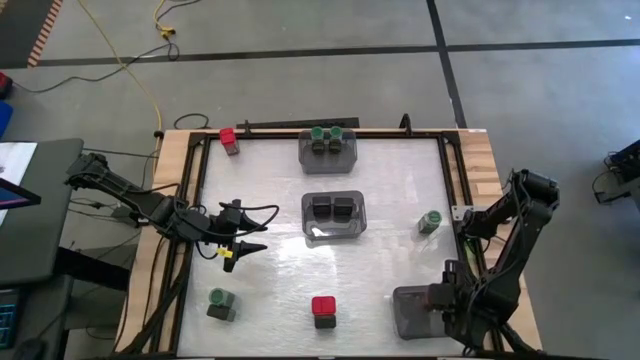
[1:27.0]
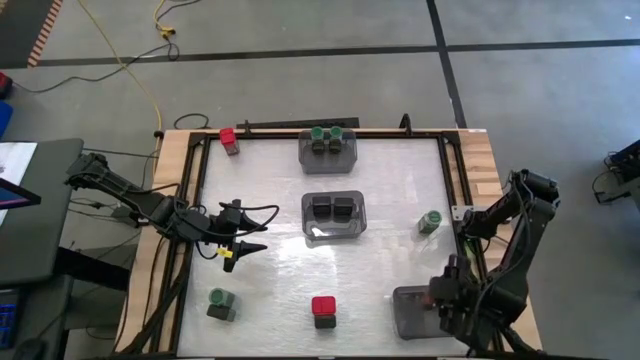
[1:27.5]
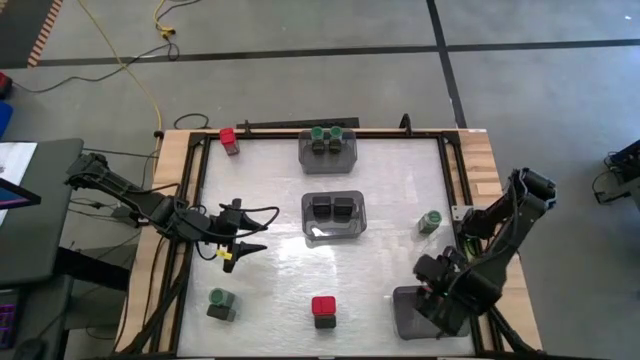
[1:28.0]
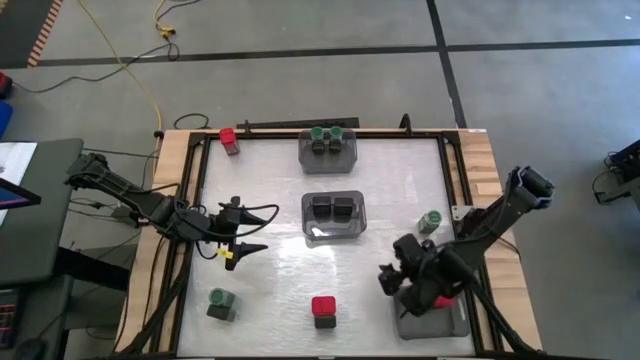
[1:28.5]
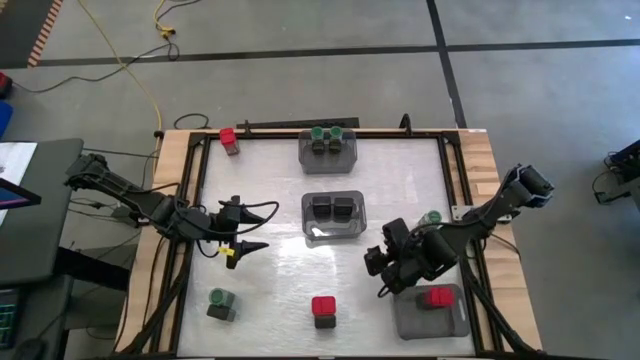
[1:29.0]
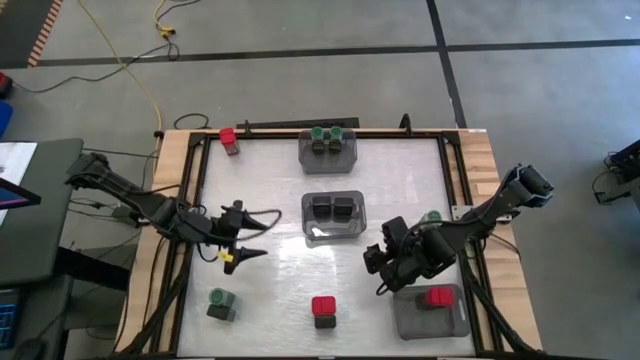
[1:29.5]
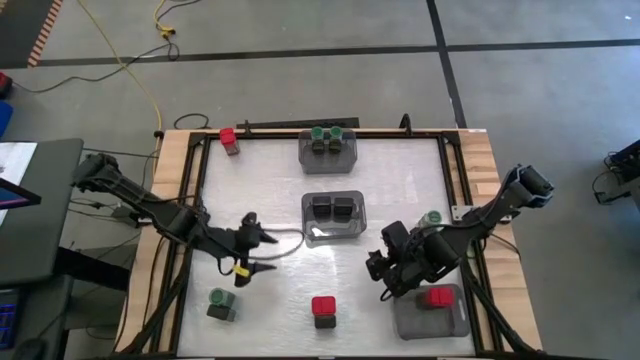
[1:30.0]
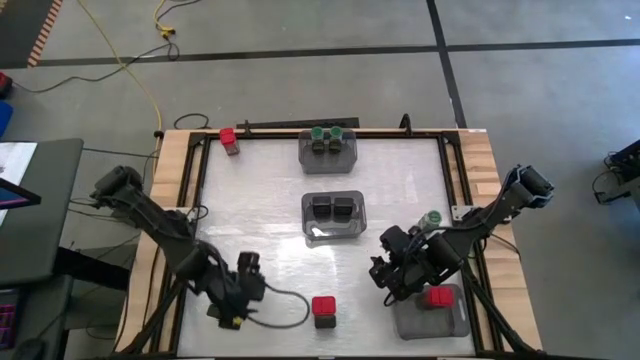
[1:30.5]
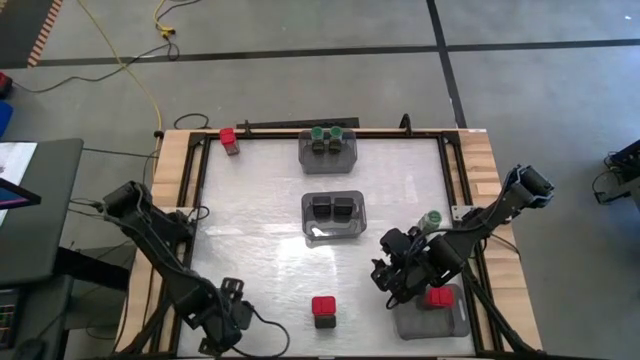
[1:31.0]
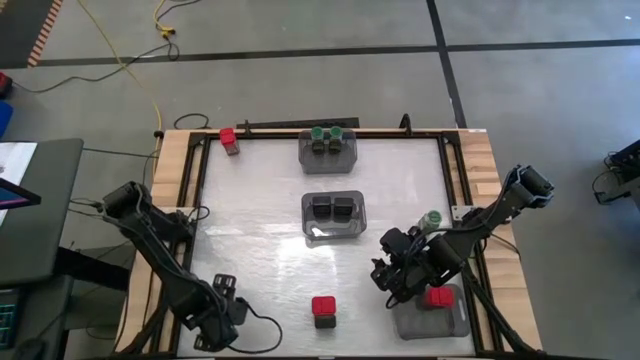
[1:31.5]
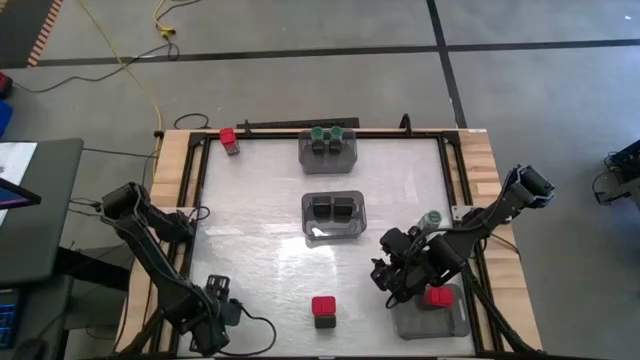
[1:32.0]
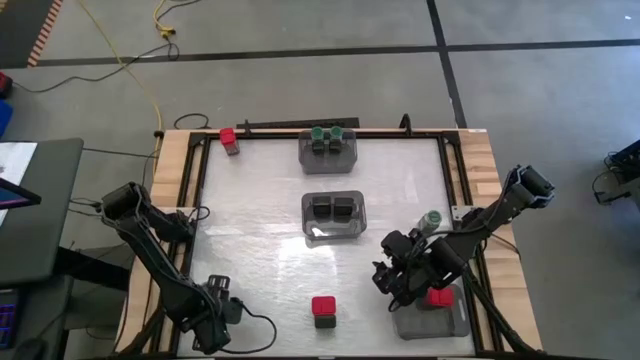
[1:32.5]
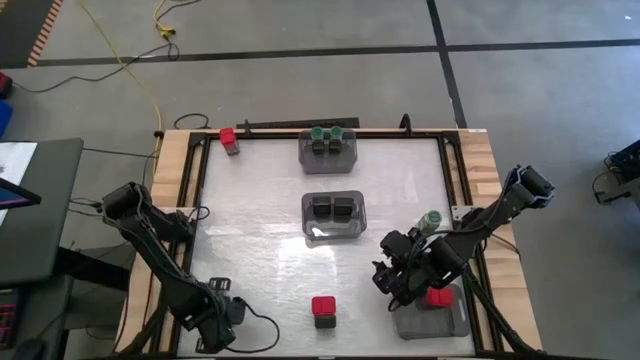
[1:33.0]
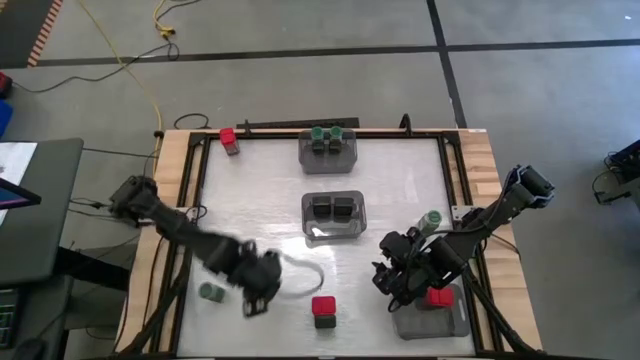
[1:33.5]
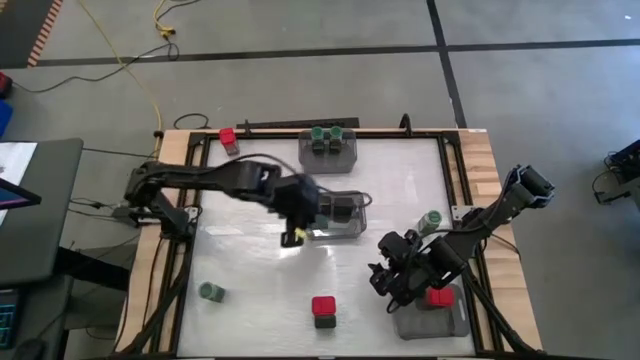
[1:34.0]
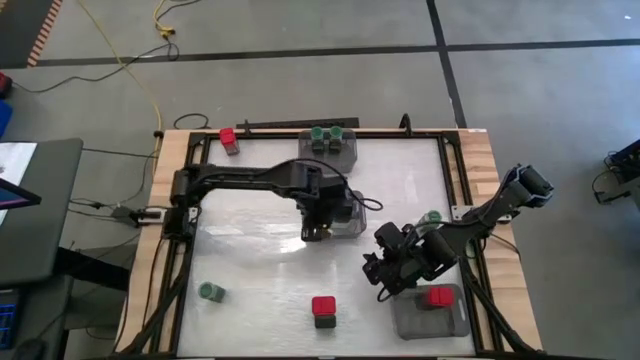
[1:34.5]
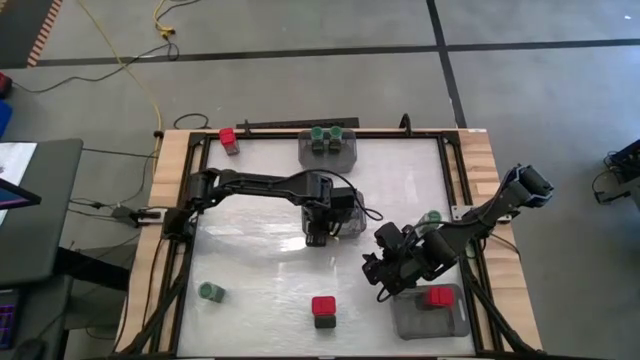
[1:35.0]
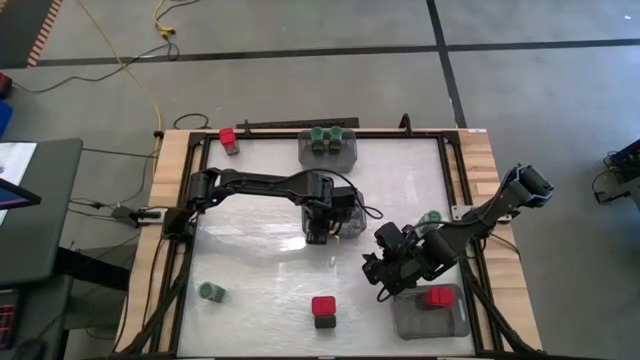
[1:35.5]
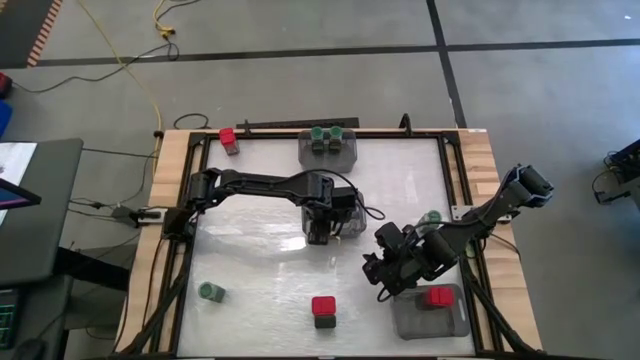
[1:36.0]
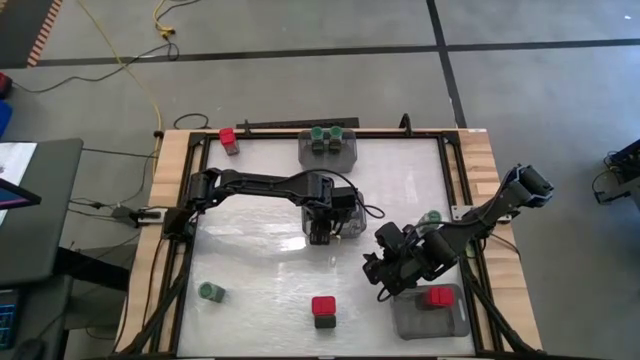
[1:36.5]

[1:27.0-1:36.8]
Task: Sort spices by type
Put the black seasoning can into the middle left black bin

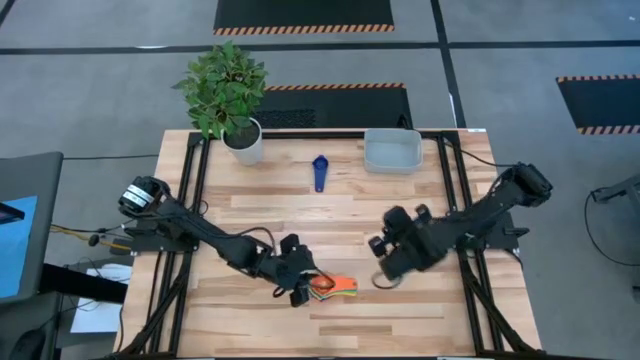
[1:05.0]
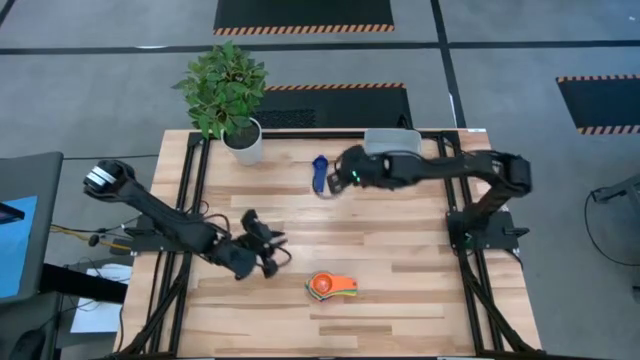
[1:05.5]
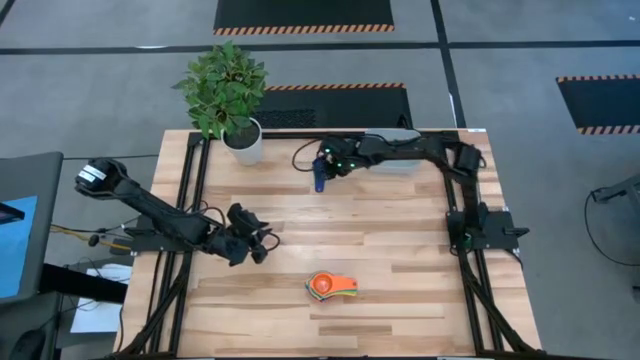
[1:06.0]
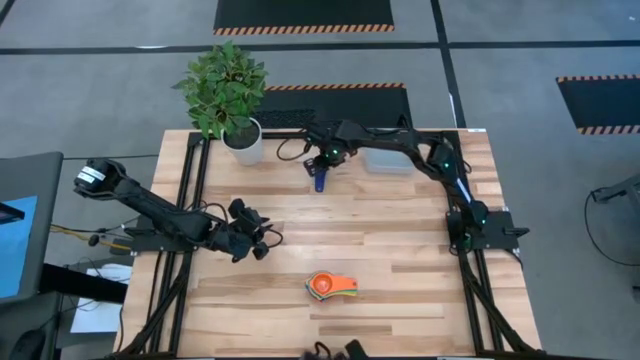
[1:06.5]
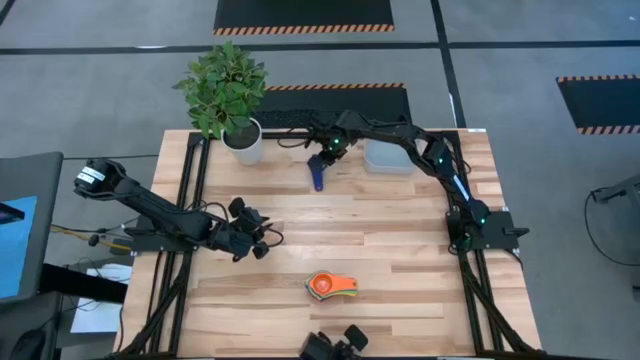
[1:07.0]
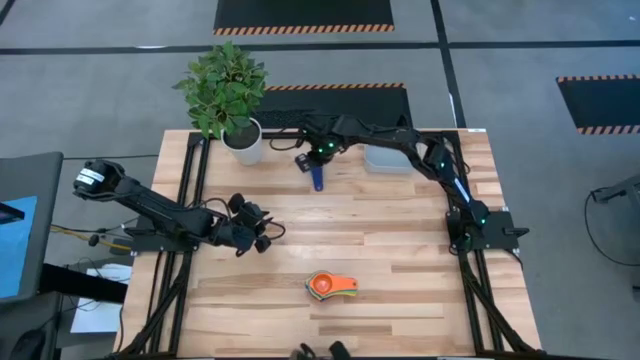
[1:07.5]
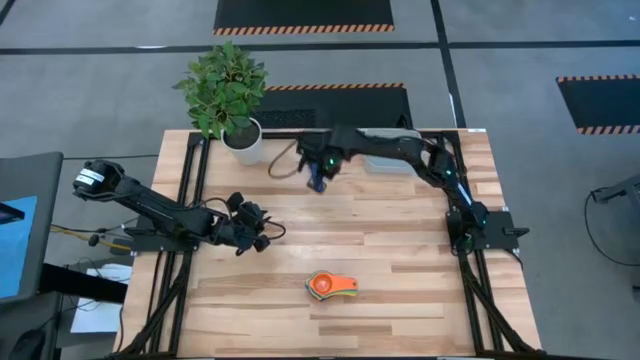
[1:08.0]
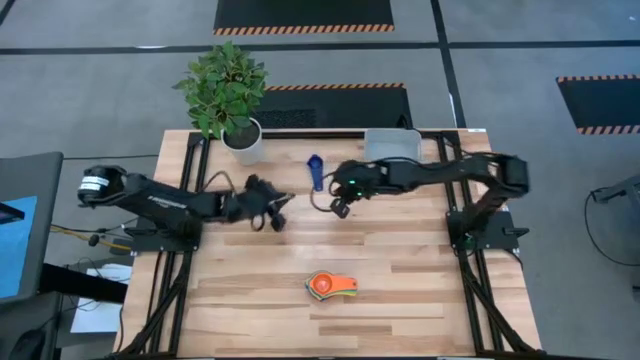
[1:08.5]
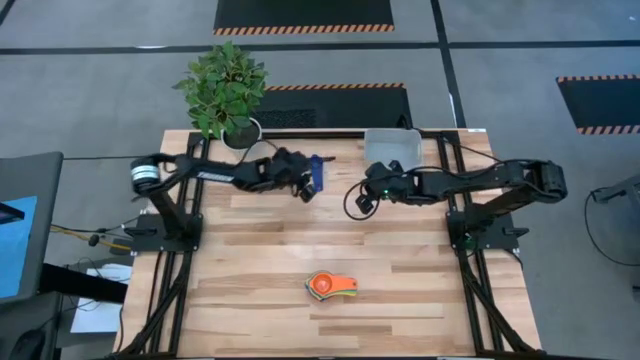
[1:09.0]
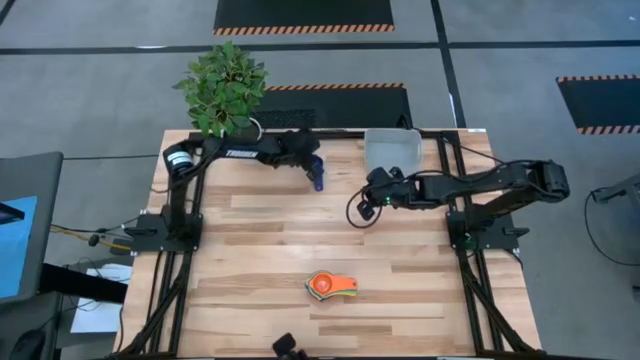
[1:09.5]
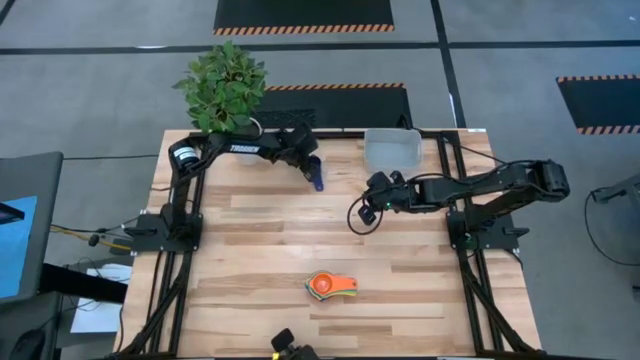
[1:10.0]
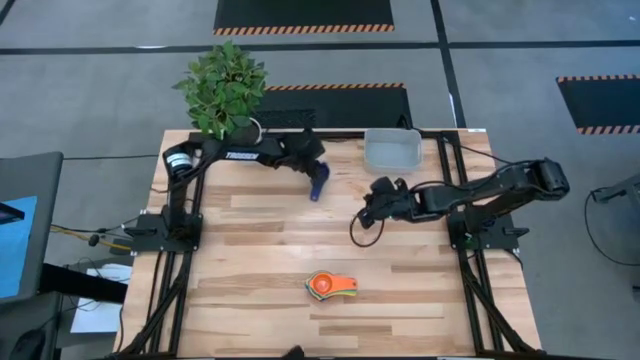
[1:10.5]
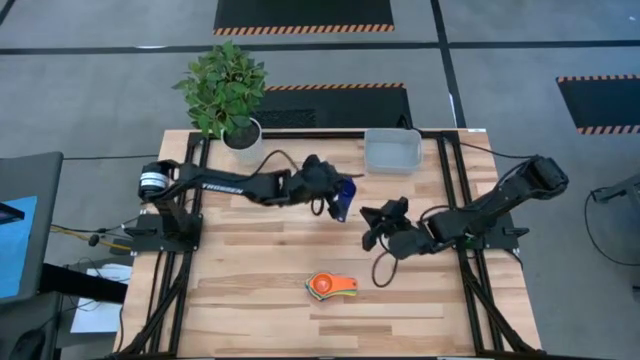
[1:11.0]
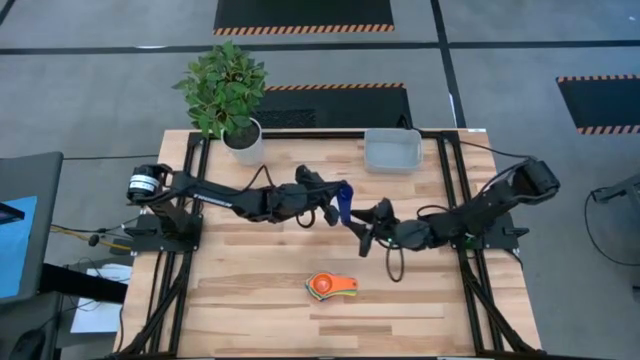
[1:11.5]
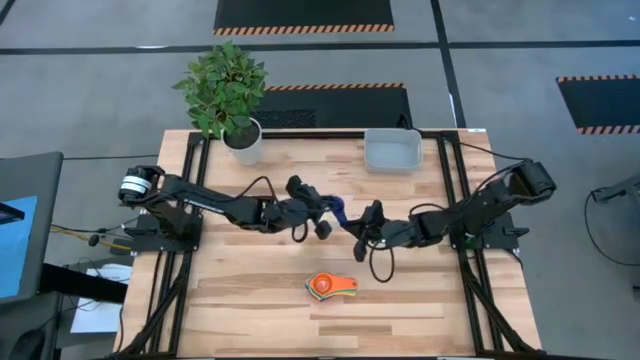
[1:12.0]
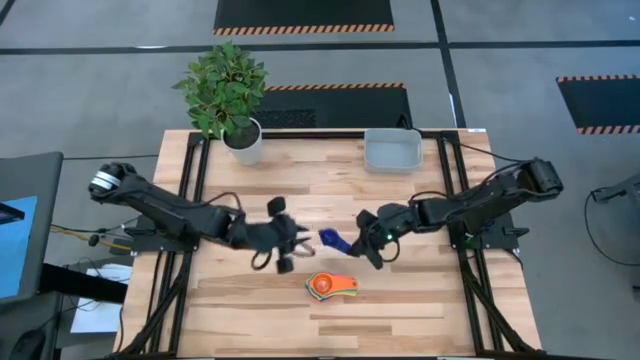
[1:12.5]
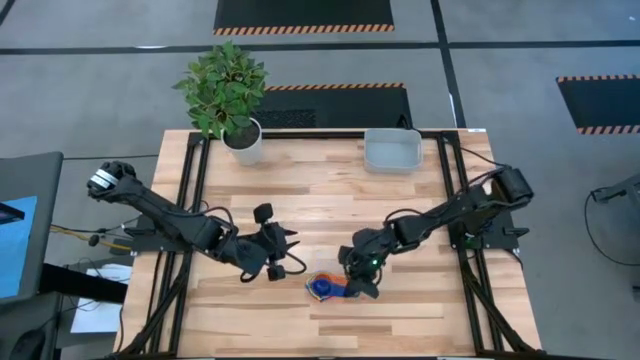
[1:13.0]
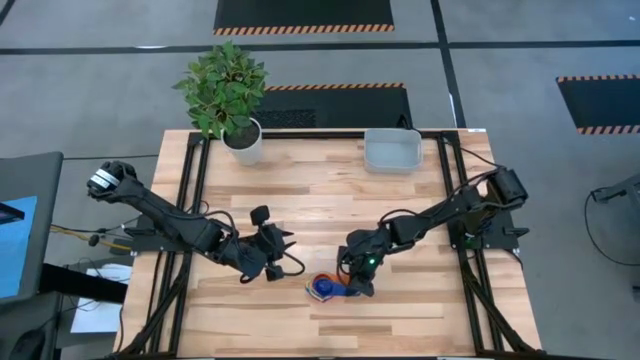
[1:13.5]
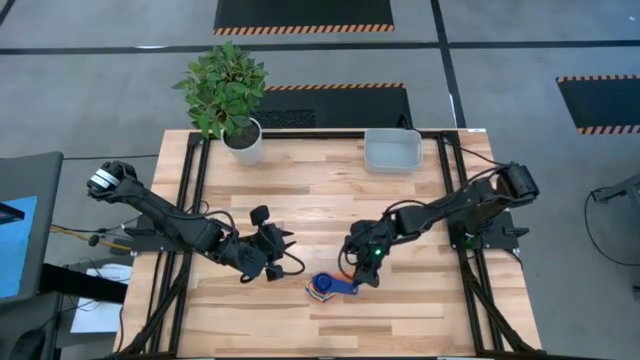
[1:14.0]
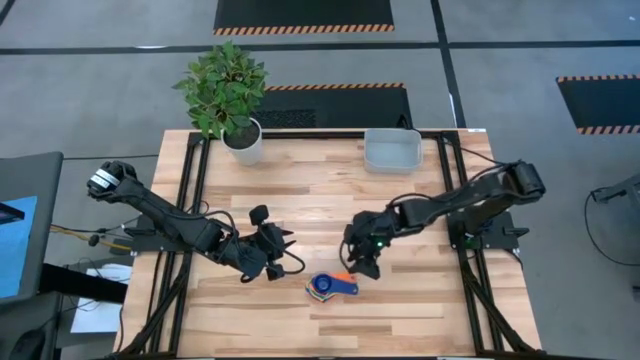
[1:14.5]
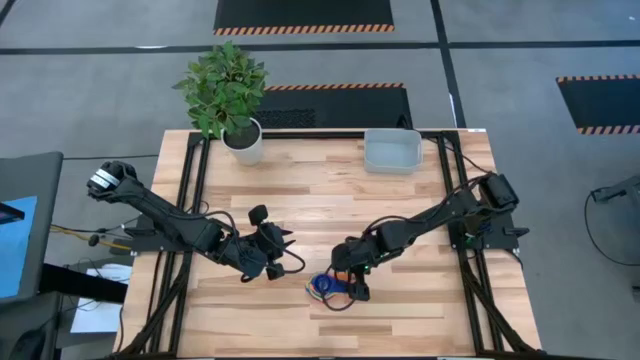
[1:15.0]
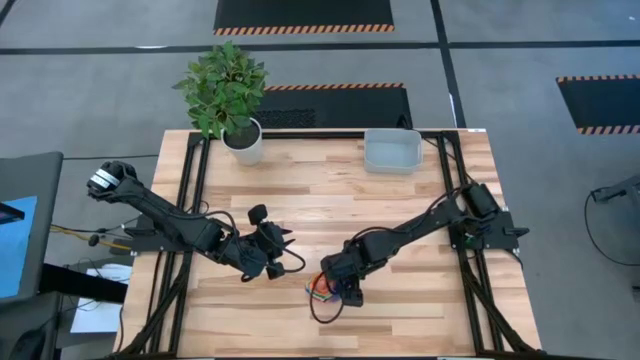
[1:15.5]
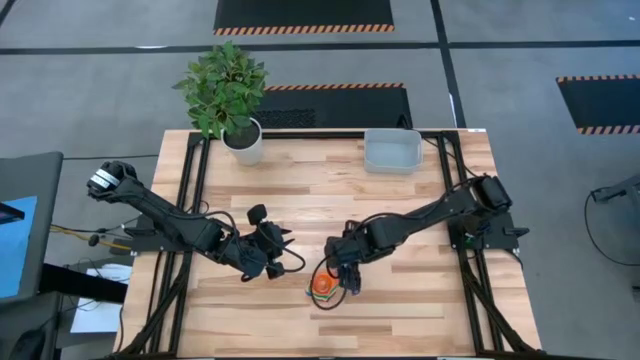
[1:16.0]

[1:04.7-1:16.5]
Task: Nest measuring cups in basket
Stack the dark blue measuring cup on top of the orange measuring cup

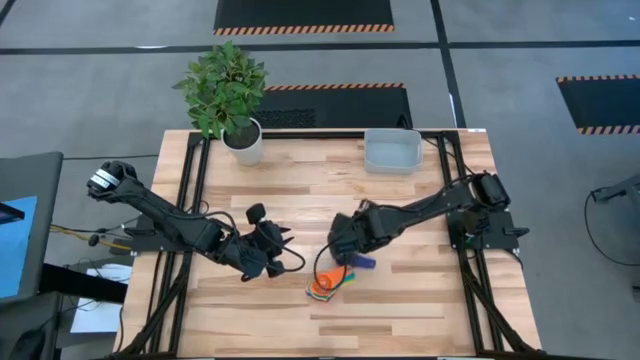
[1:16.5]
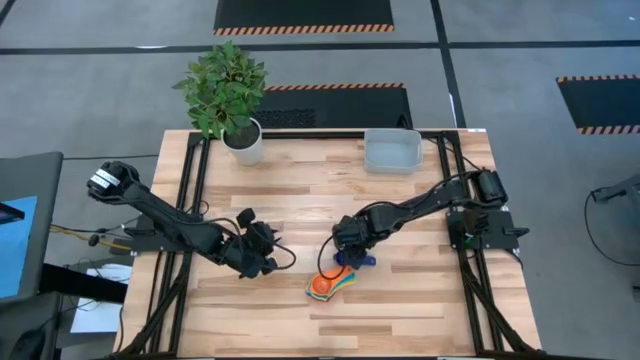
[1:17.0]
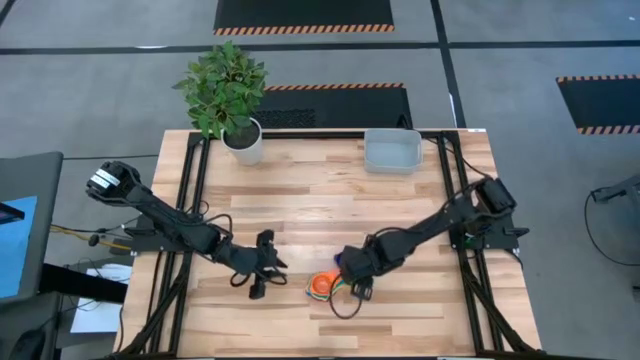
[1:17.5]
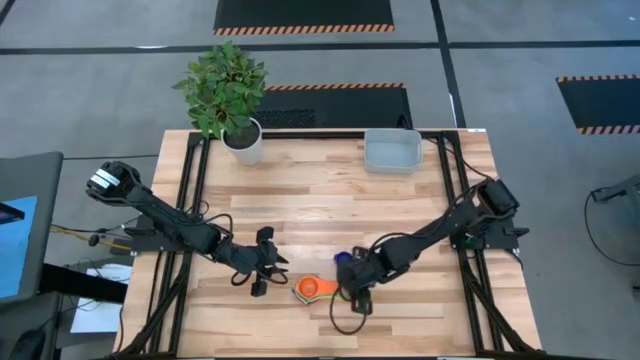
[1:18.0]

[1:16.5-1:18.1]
Adjust the stacked measuring cups
